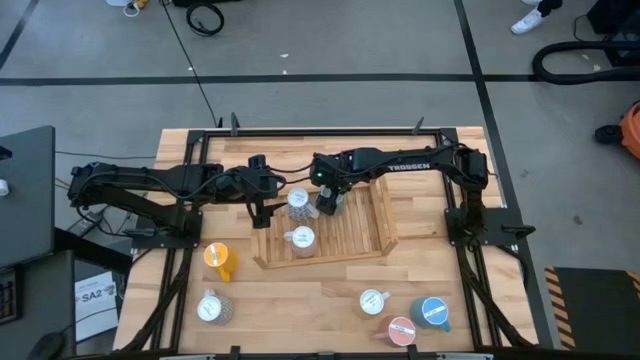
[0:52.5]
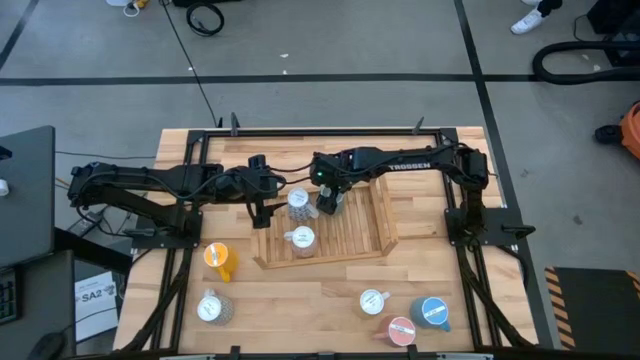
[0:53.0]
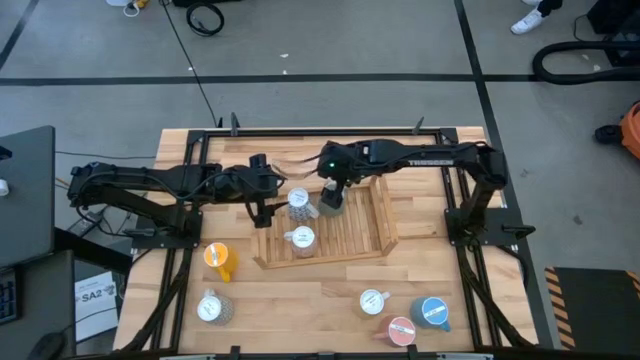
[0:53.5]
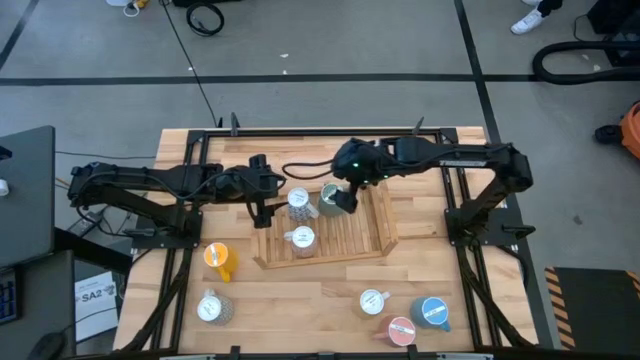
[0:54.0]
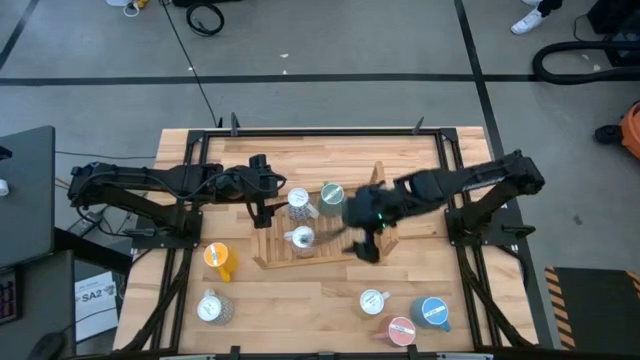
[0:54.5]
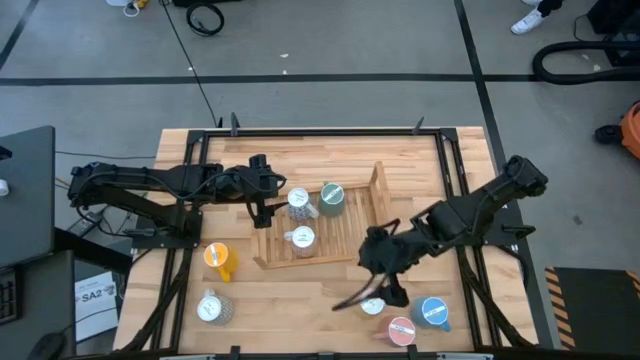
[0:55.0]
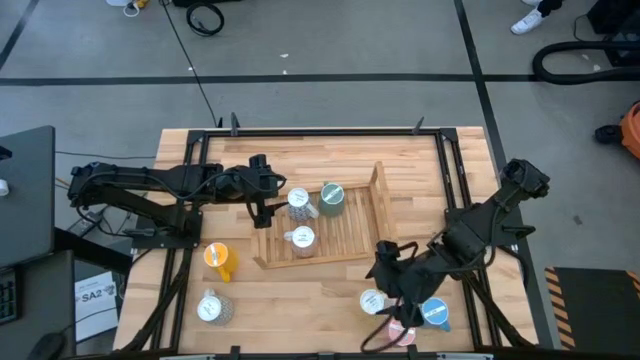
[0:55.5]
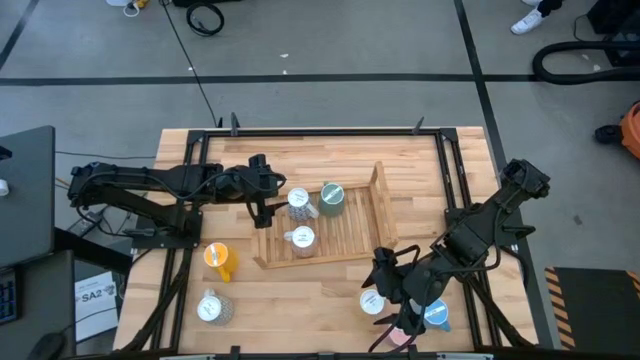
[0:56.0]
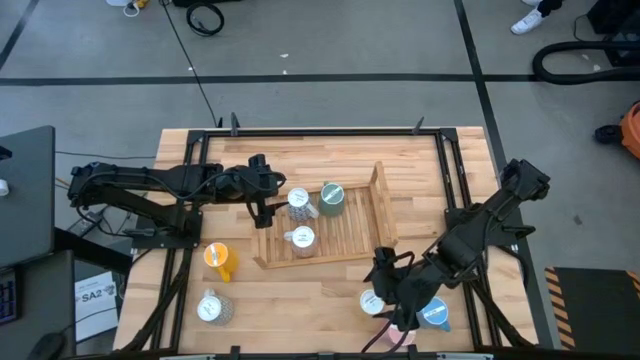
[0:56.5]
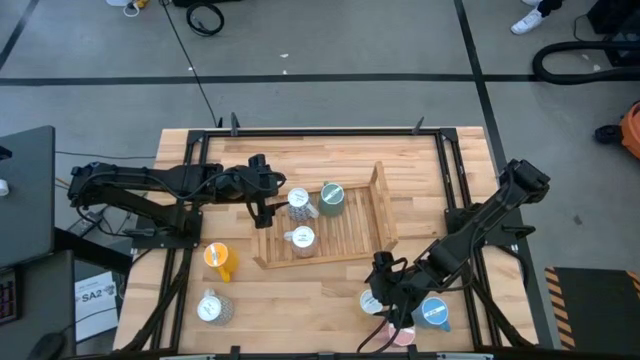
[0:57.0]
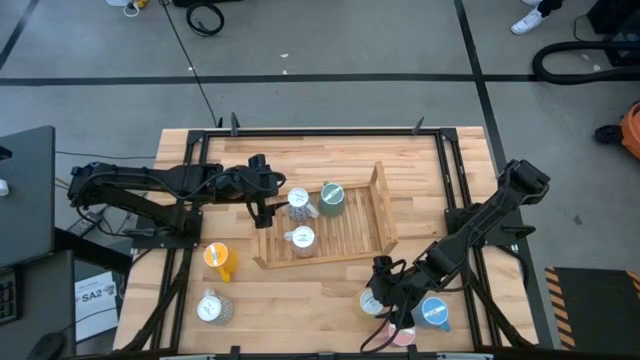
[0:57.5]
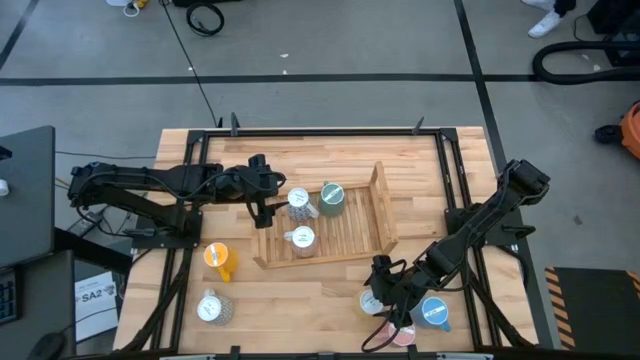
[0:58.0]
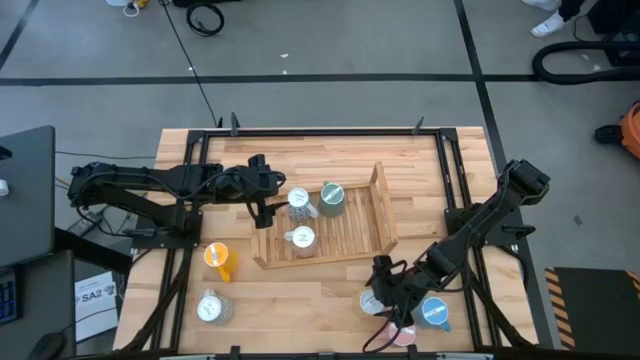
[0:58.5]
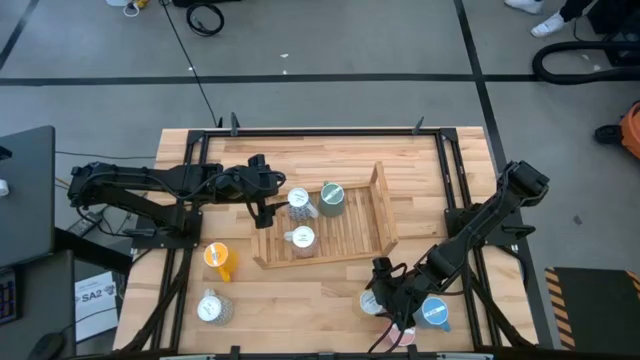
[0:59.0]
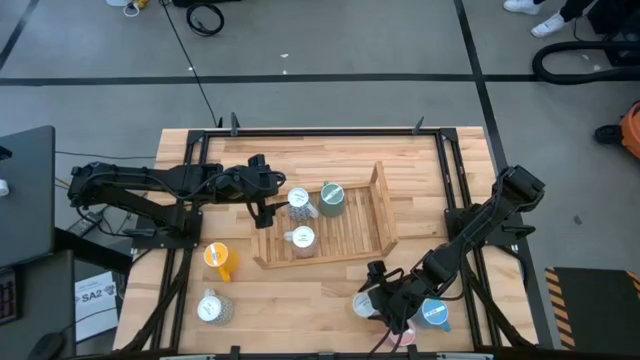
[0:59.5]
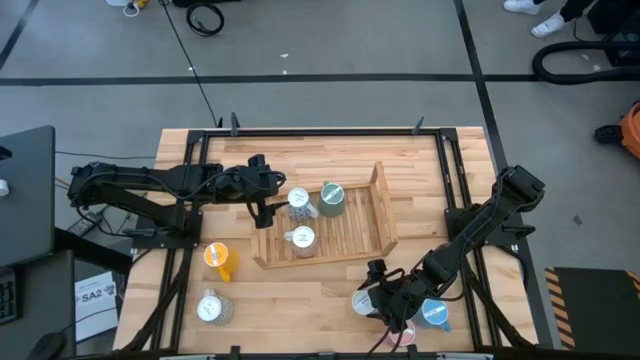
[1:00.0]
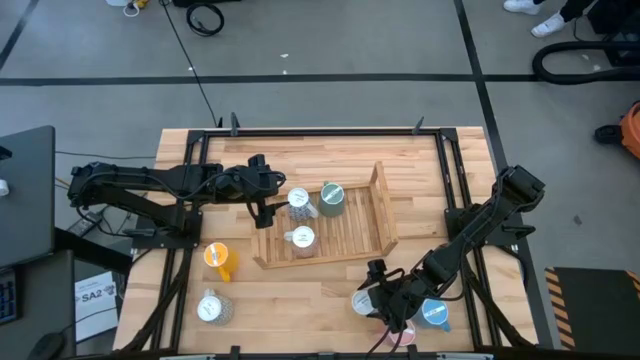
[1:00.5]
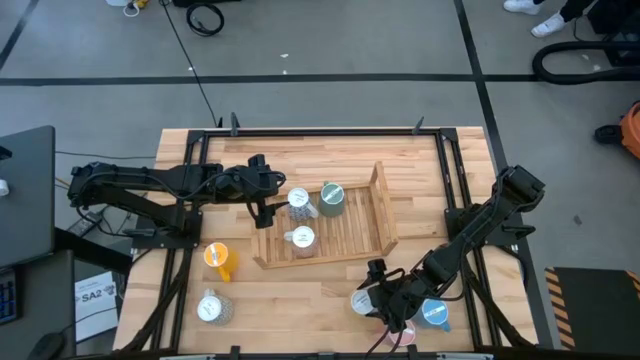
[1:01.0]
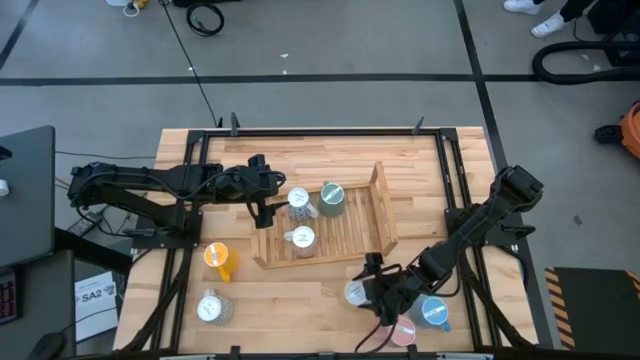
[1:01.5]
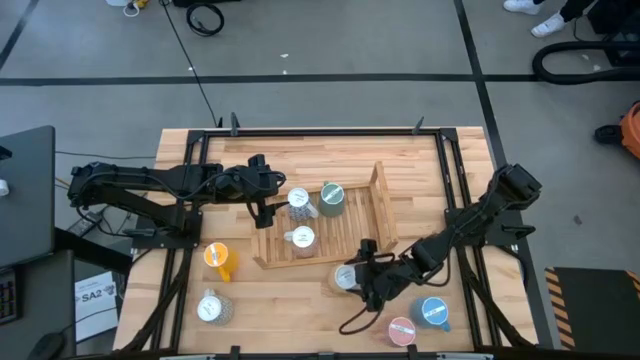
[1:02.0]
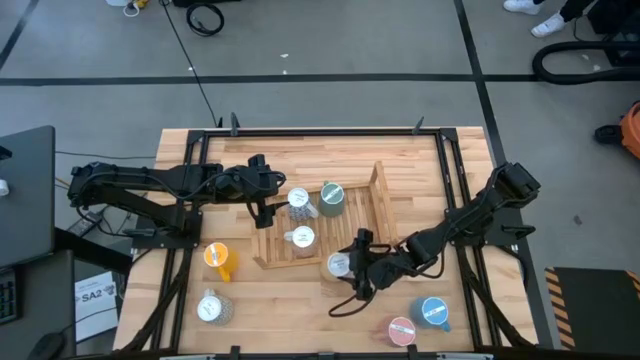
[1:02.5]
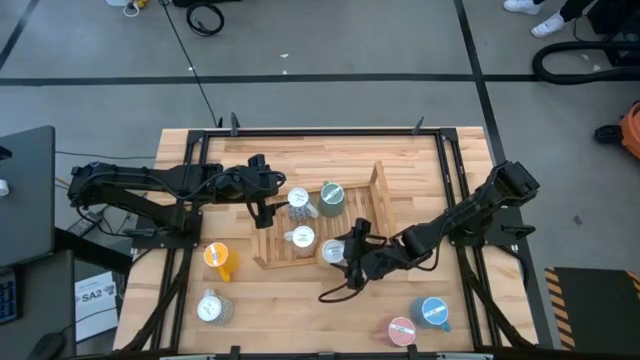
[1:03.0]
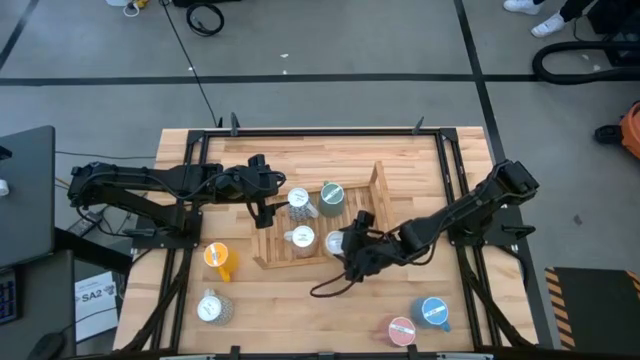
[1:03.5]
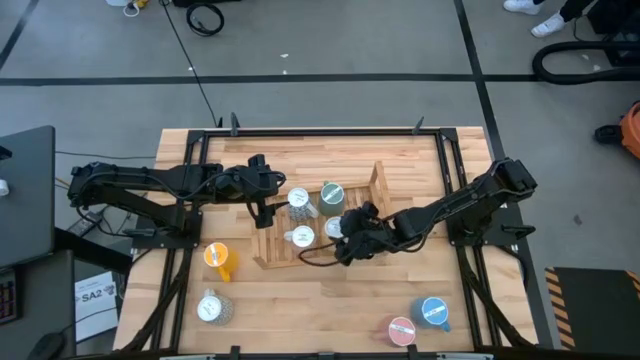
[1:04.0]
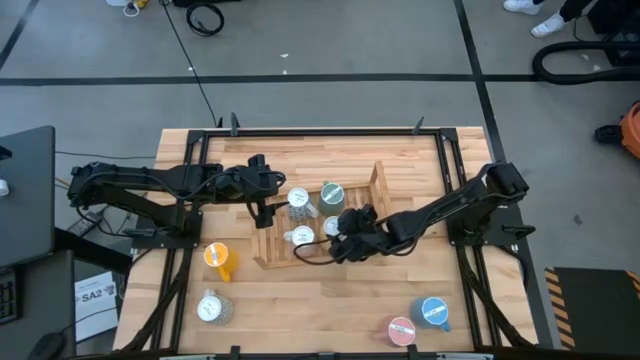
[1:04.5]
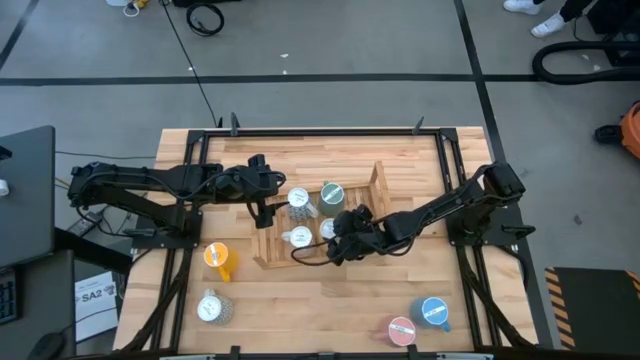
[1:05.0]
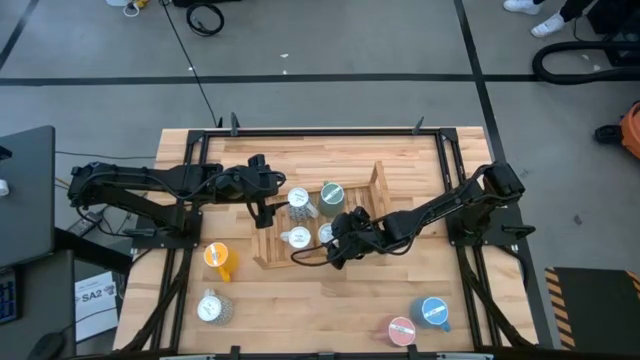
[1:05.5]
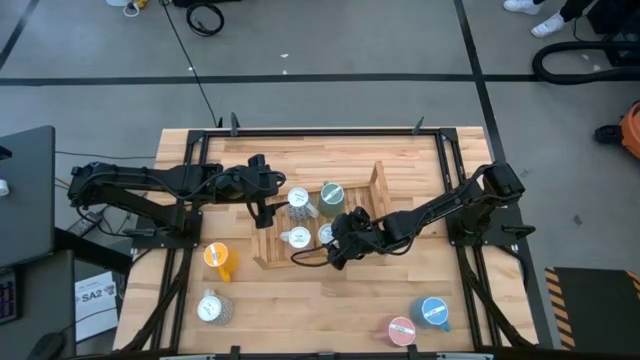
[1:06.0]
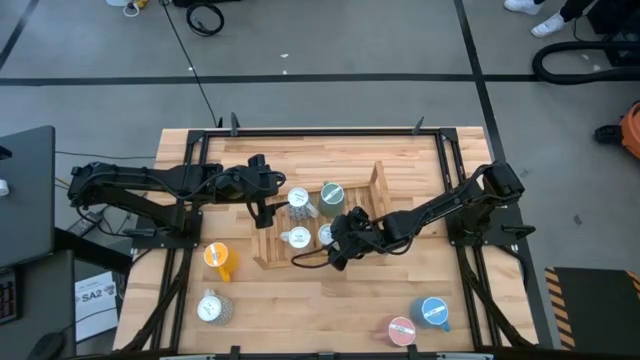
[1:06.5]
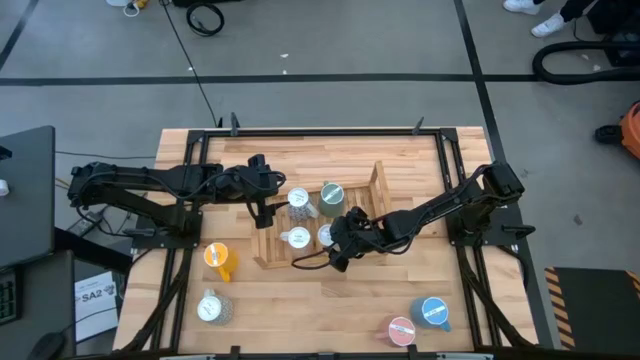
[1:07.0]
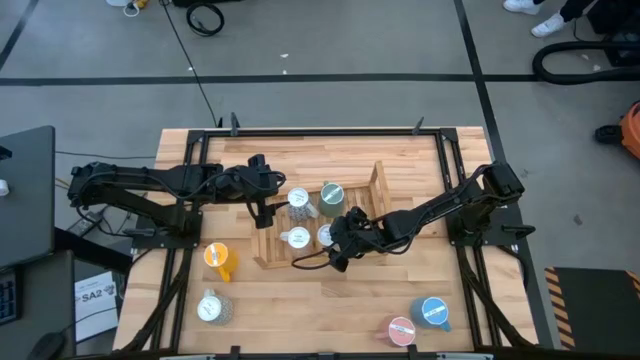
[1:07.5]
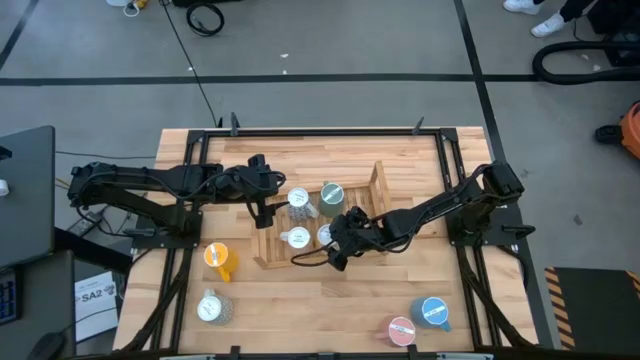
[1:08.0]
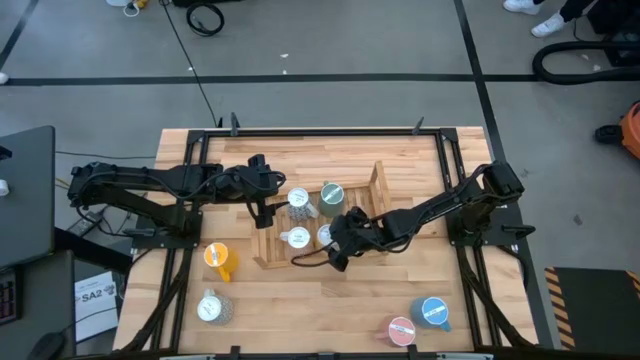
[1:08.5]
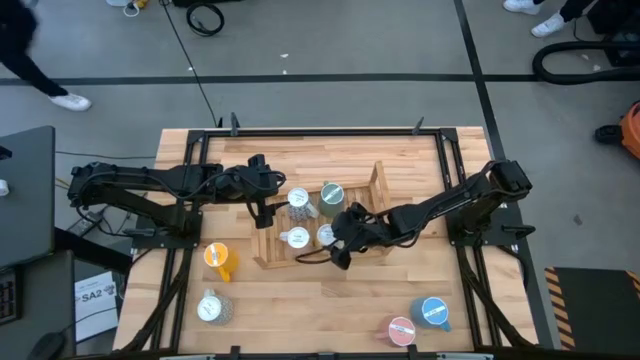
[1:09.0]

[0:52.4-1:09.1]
Task: Place coffee mugs
Put the yellow patterned mug on the shelf

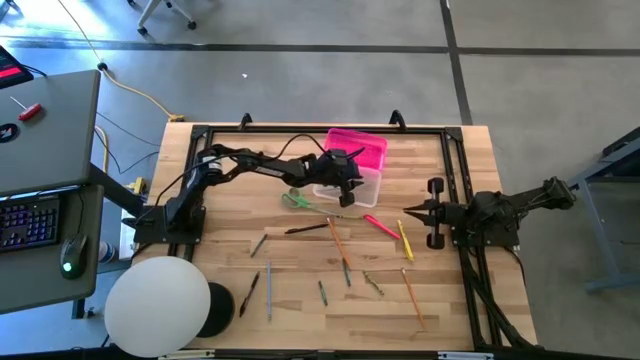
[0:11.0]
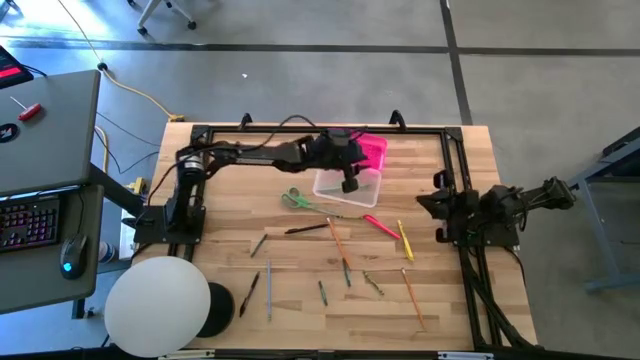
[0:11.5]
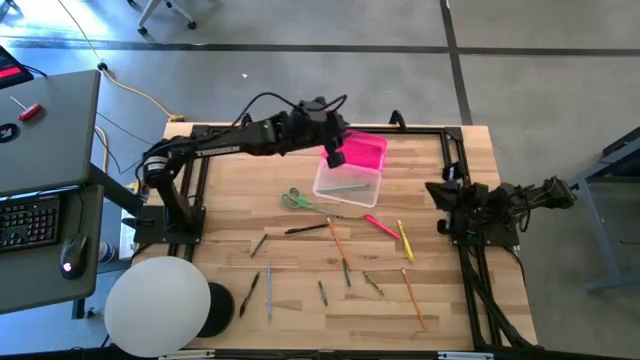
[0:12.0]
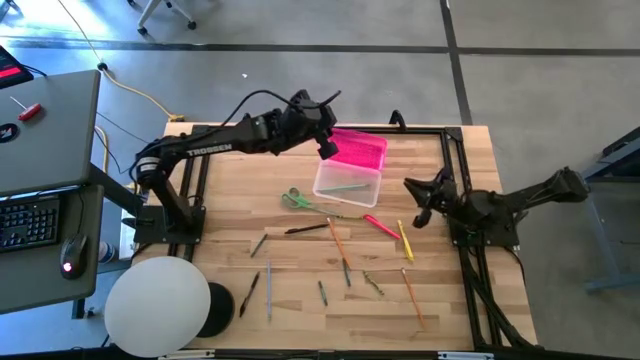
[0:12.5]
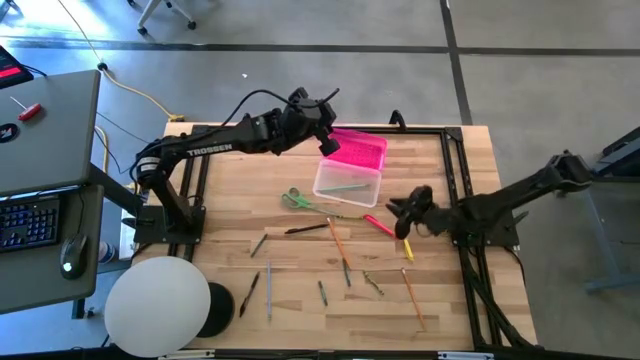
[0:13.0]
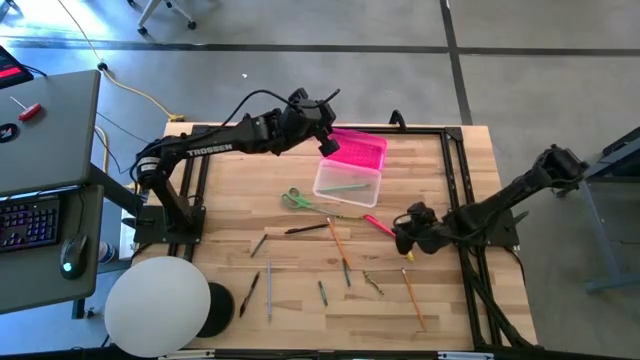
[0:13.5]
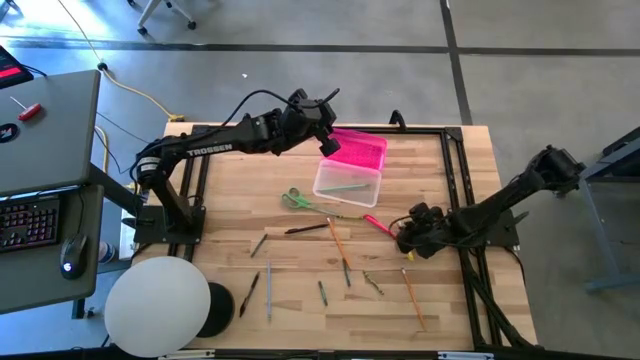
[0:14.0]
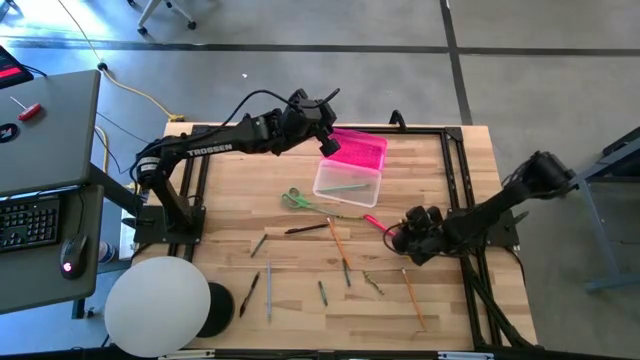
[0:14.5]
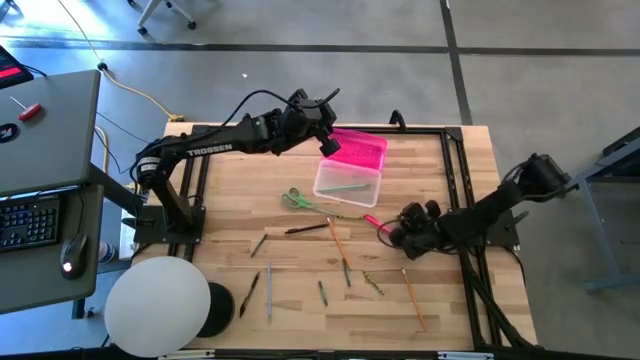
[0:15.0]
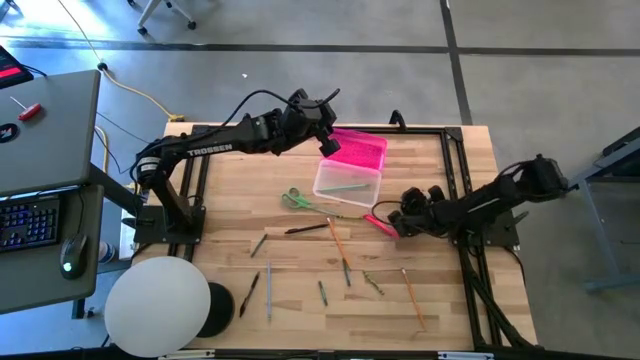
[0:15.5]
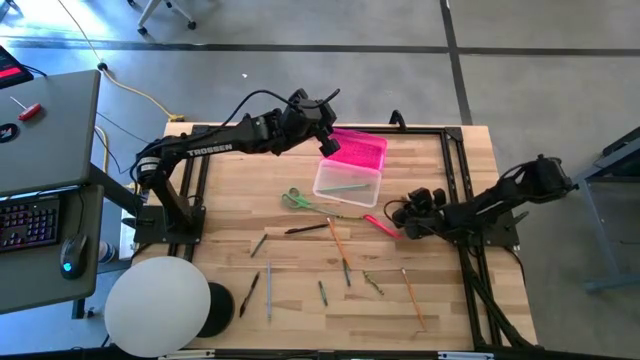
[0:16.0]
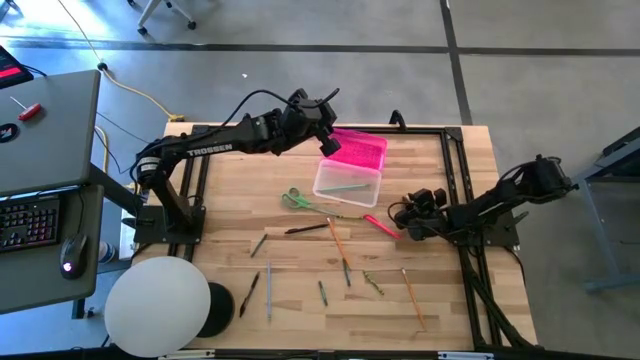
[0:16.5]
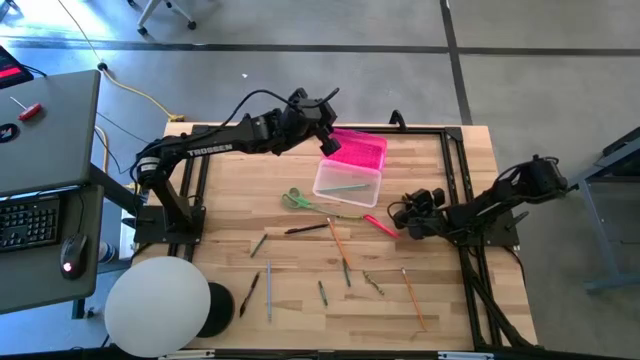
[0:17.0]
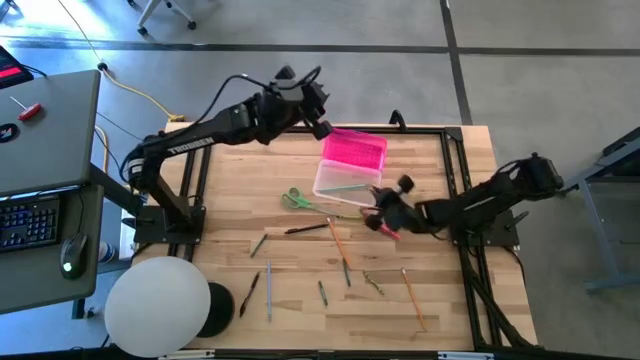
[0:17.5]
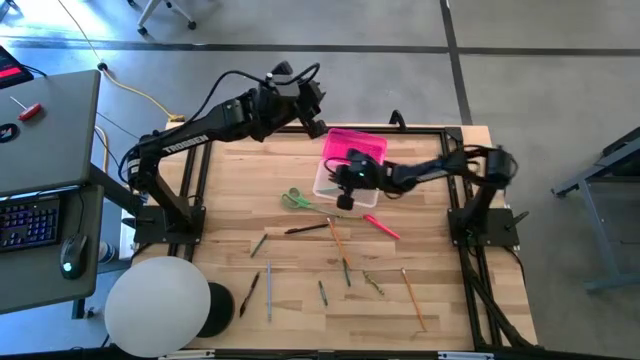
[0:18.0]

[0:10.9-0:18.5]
Task: Pick & place school supplies into a supply box
Put the yellow highlighter pen into the supply box
